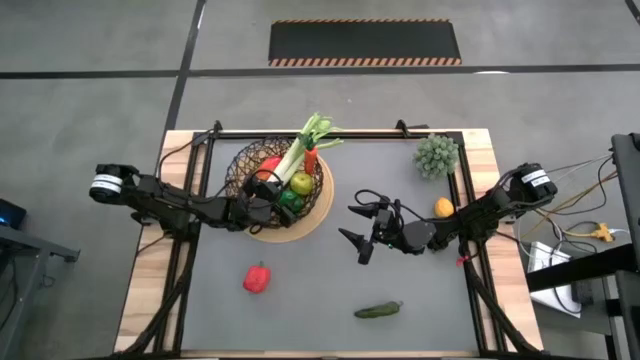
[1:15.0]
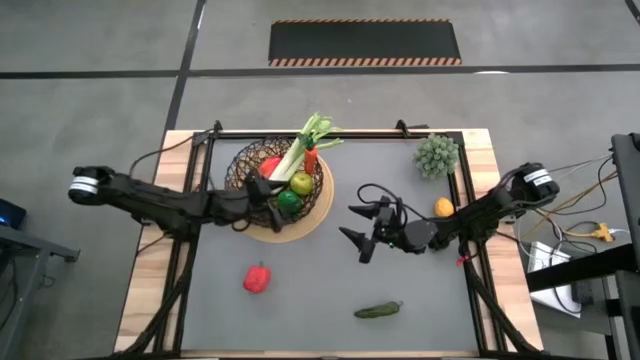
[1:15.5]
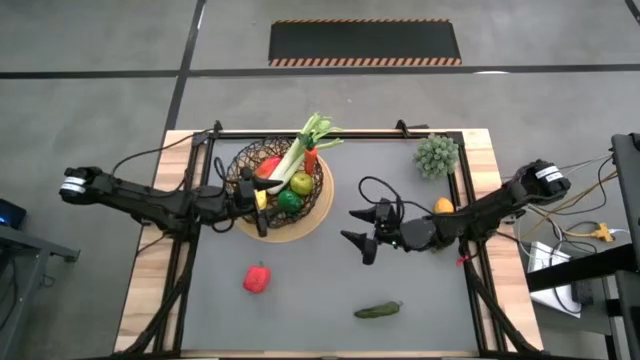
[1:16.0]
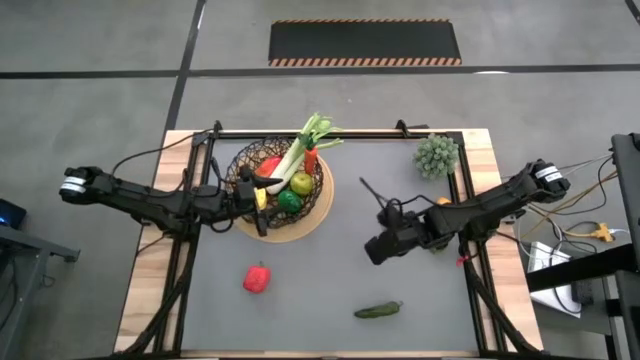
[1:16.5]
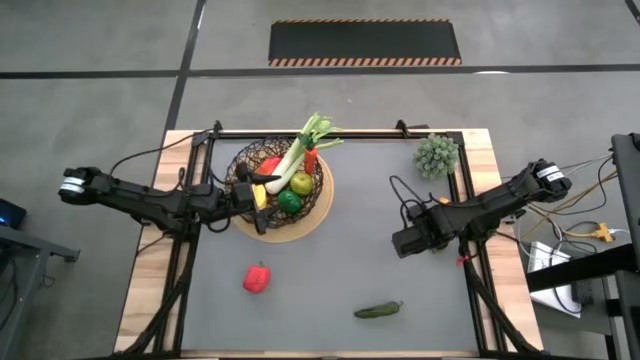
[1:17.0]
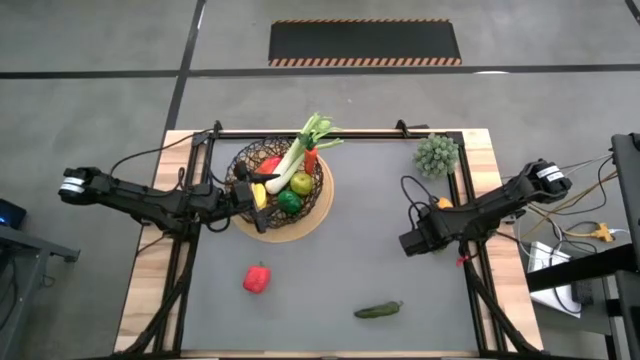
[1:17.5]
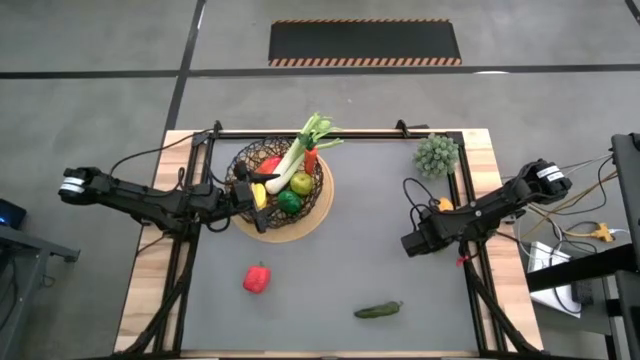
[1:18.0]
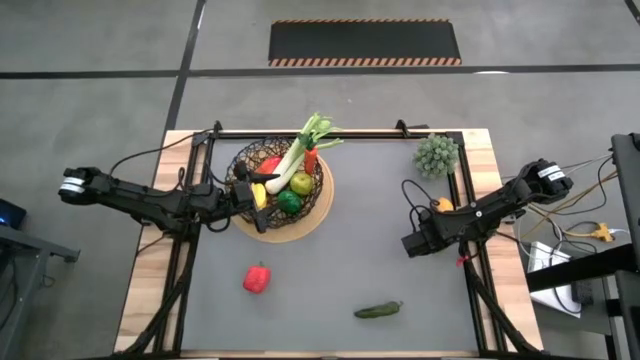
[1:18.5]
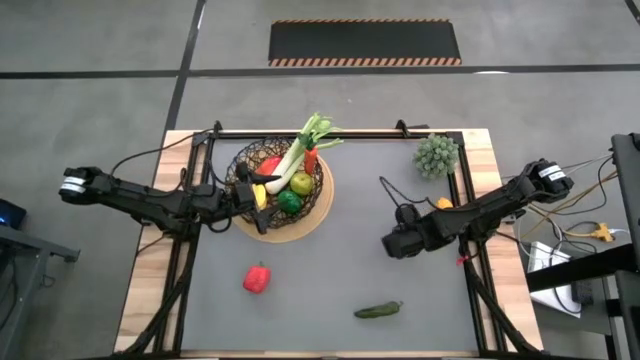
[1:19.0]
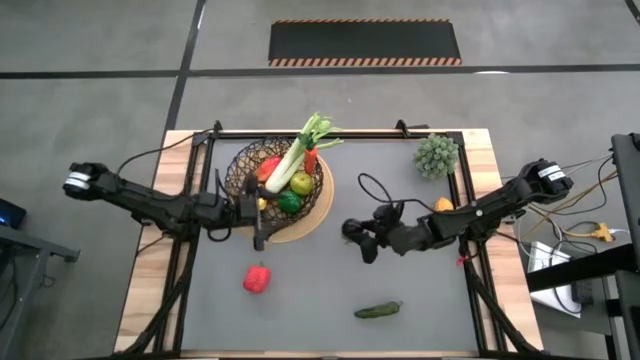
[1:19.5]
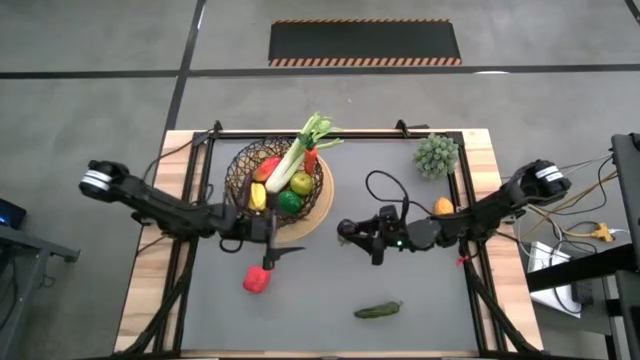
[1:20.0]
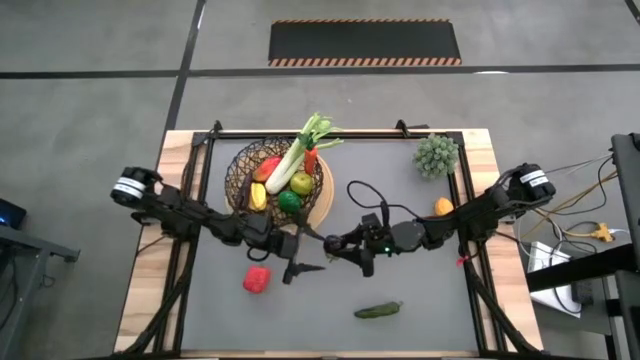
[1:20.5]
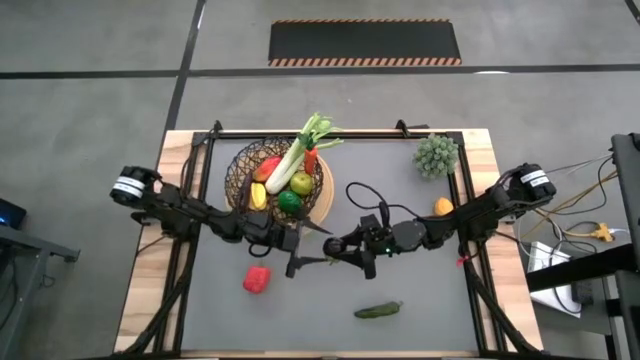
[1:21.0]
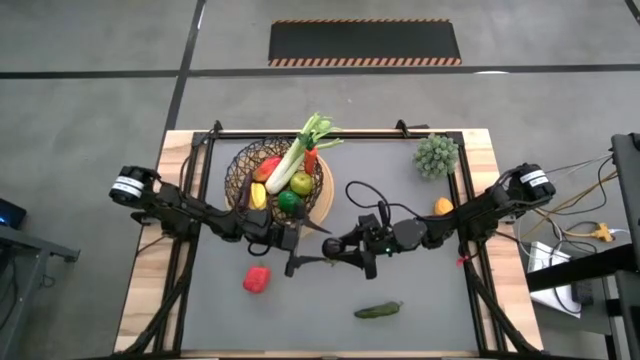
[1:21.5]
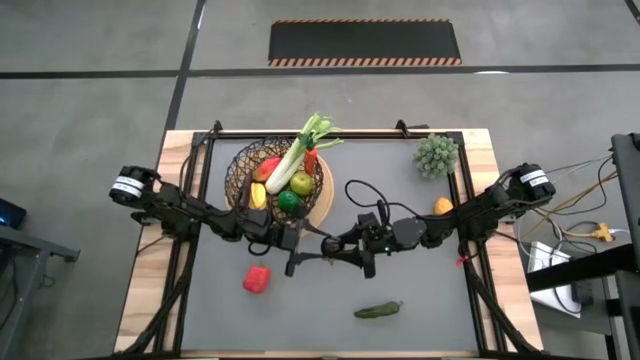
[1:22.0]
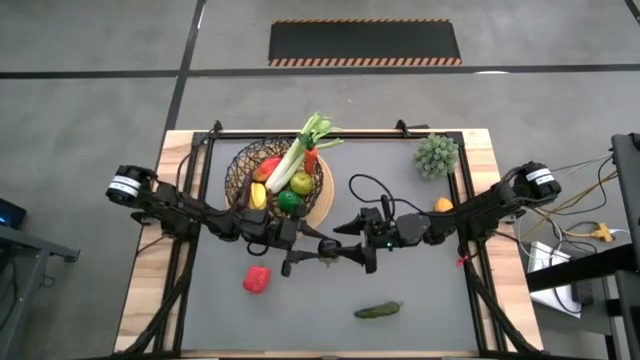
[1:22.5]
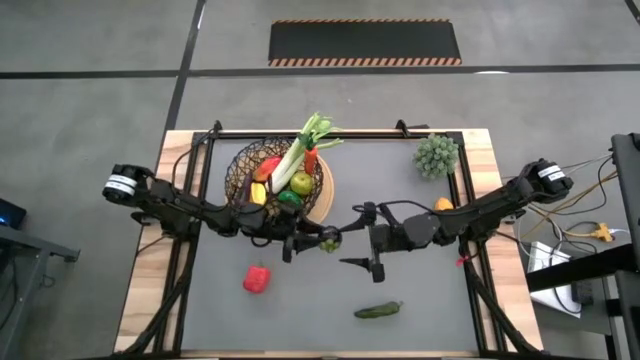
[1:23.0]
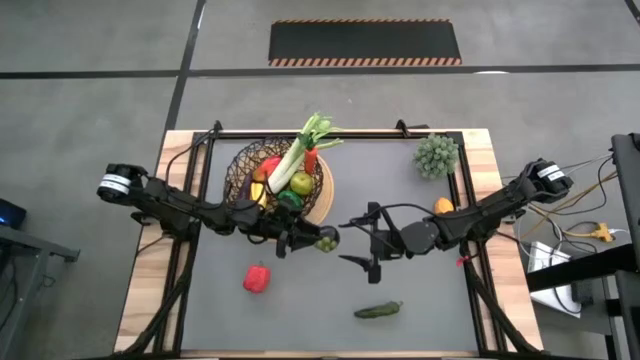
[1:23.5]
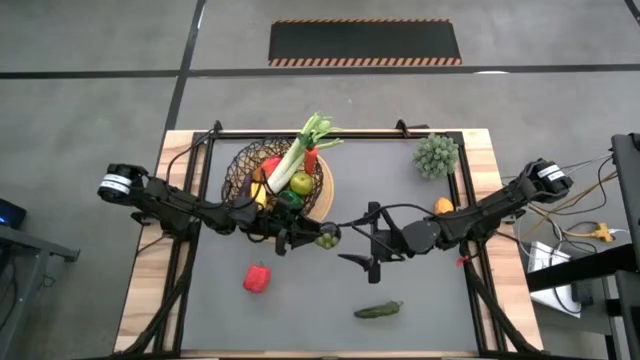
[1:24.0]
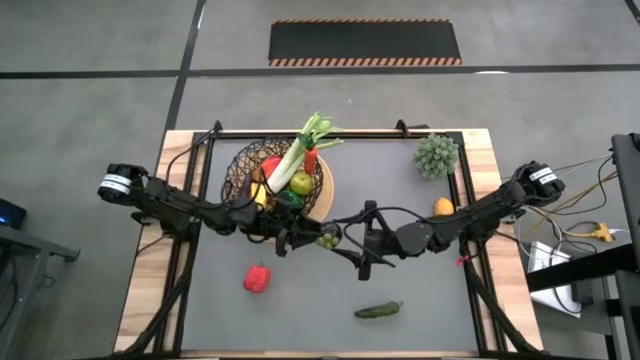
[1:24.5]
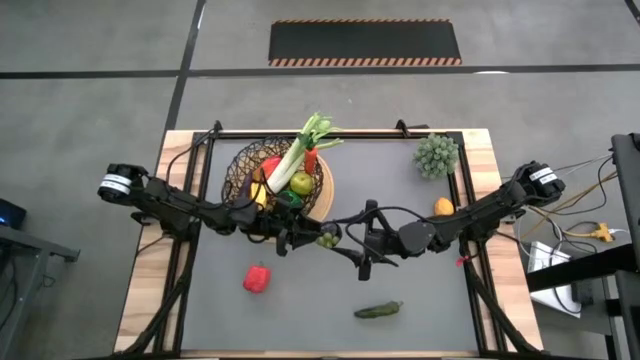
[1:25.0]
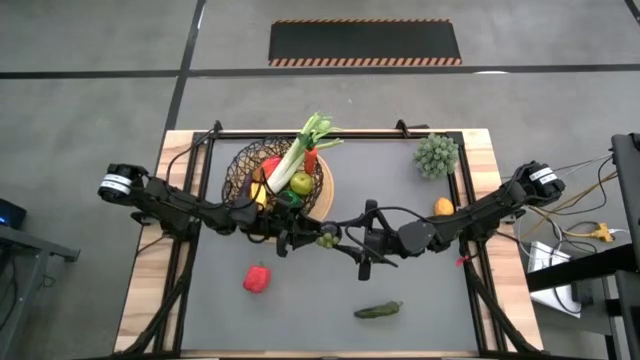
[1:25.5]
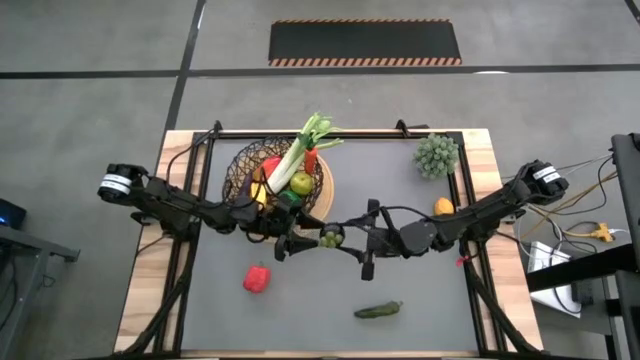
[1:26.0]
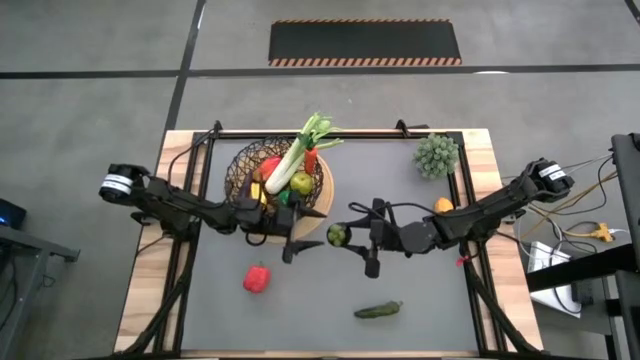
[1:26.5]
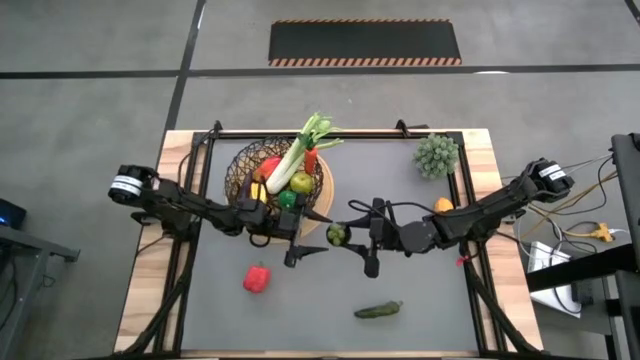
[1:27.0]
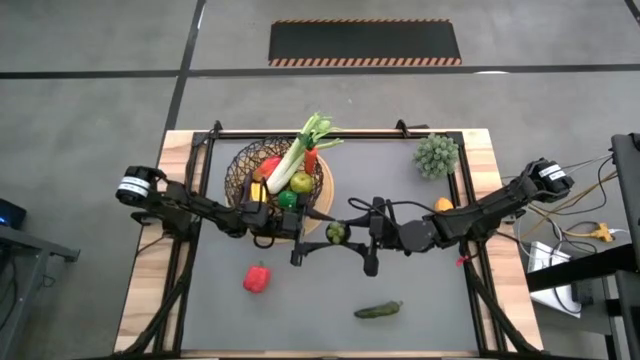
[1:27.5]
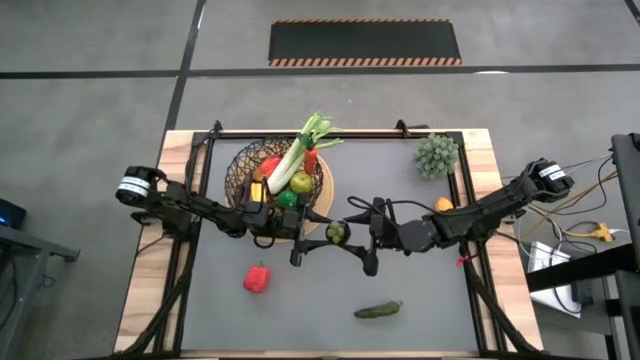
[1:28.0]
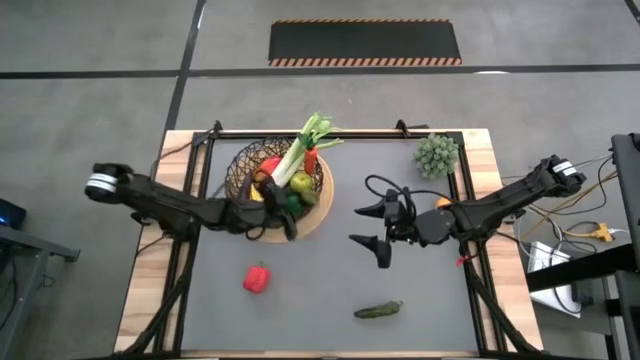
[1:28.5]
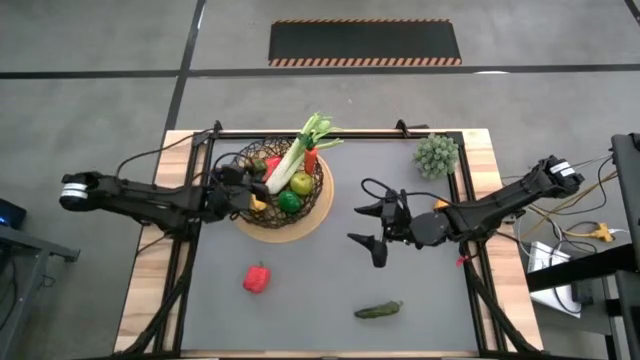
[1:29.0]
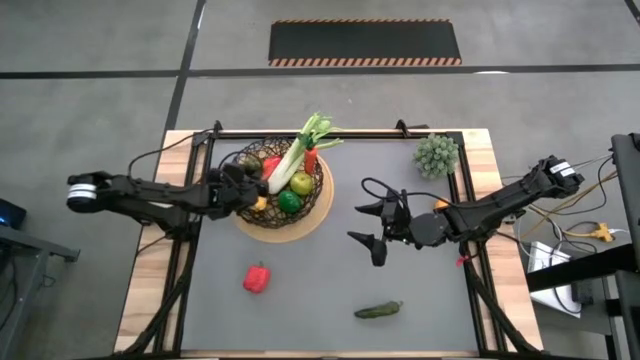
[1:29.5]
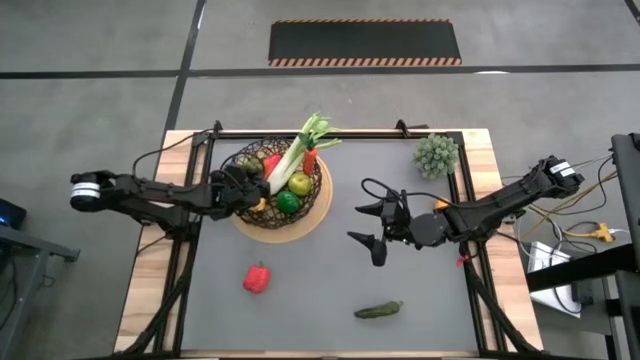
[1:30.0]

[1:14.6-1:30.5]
Task: Build produce basket
Put the purple mangosteen into the black wire basket

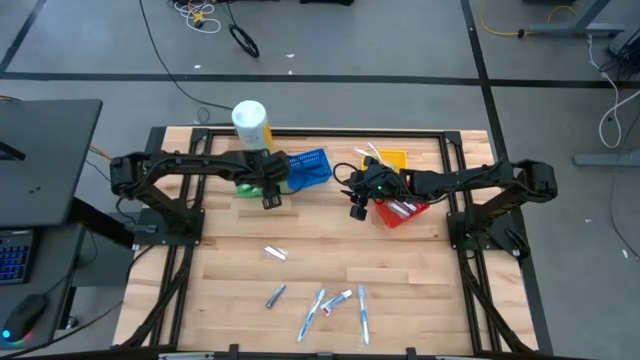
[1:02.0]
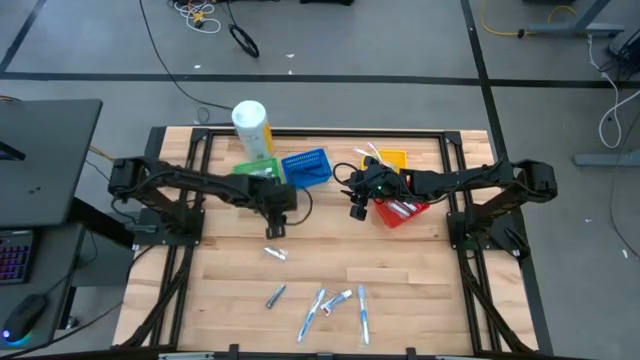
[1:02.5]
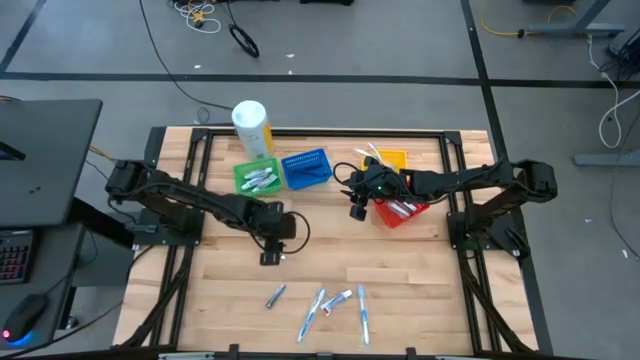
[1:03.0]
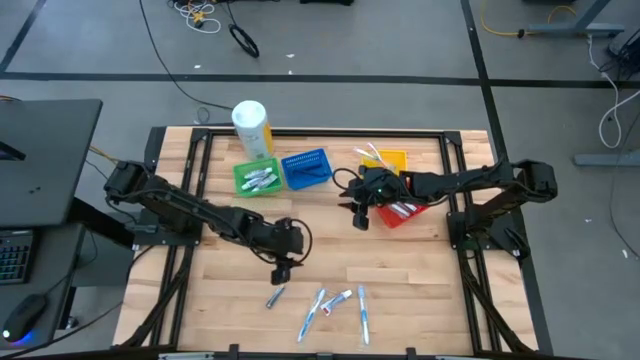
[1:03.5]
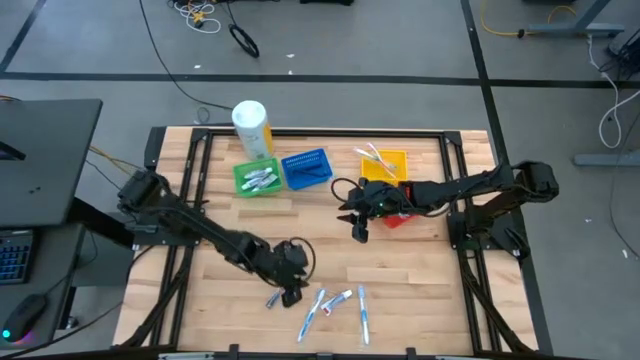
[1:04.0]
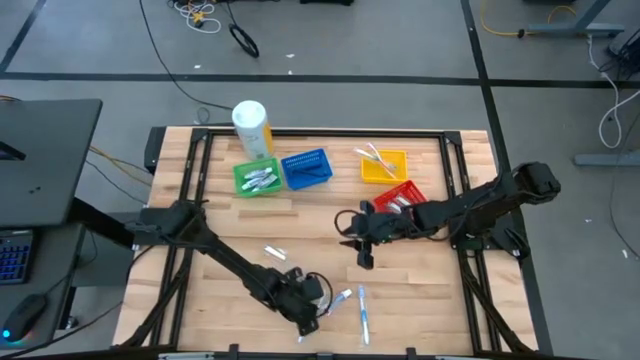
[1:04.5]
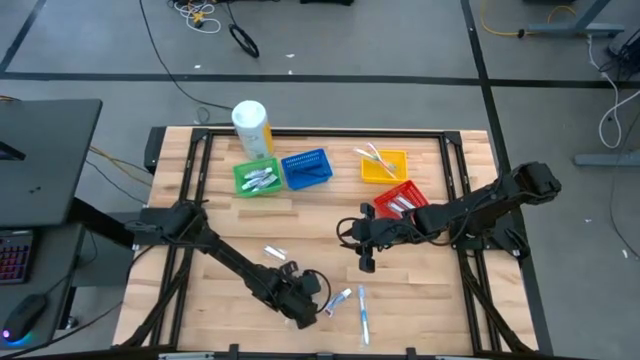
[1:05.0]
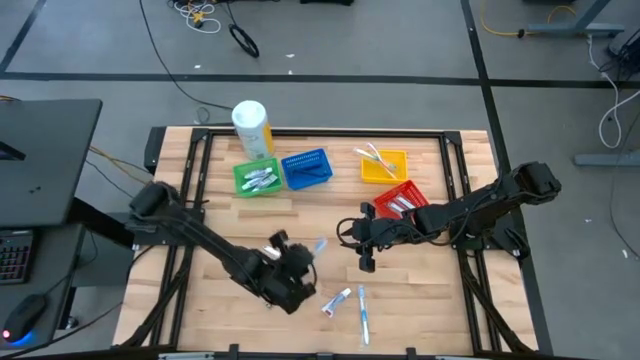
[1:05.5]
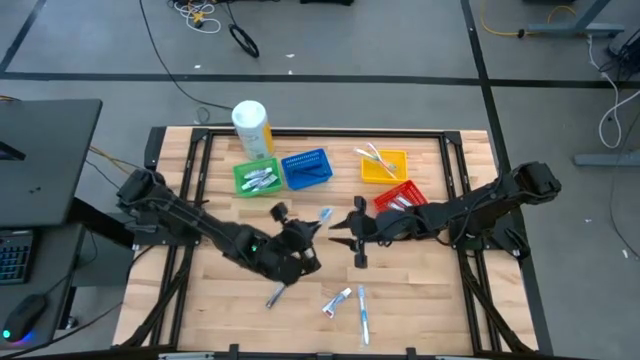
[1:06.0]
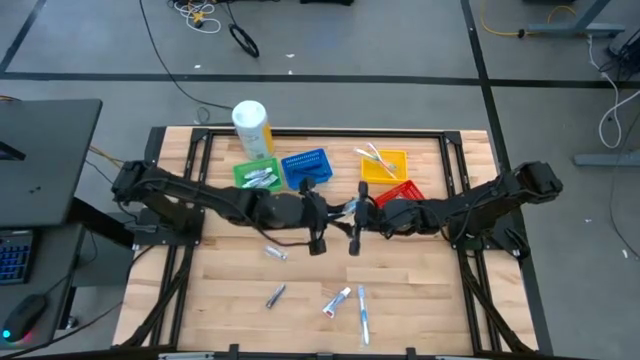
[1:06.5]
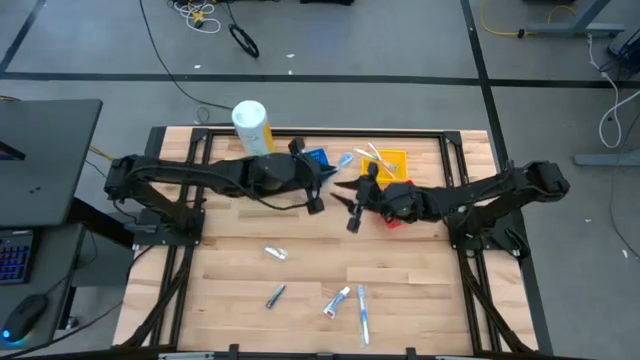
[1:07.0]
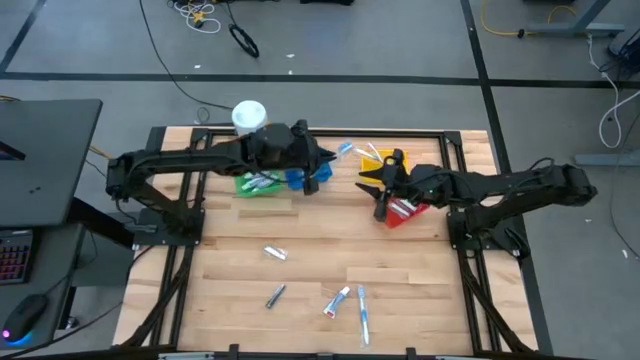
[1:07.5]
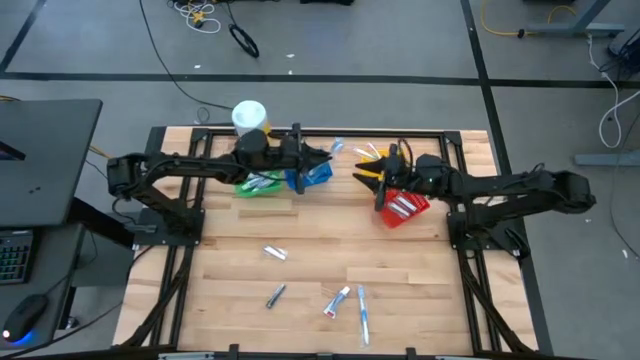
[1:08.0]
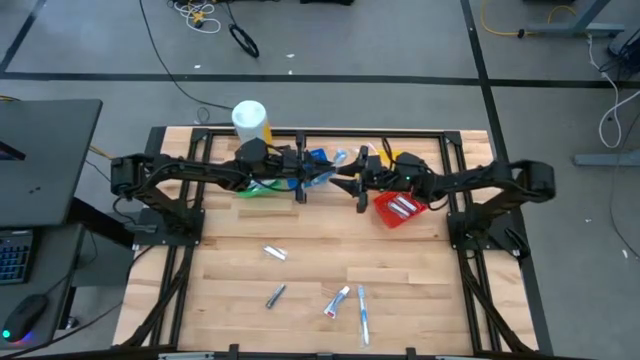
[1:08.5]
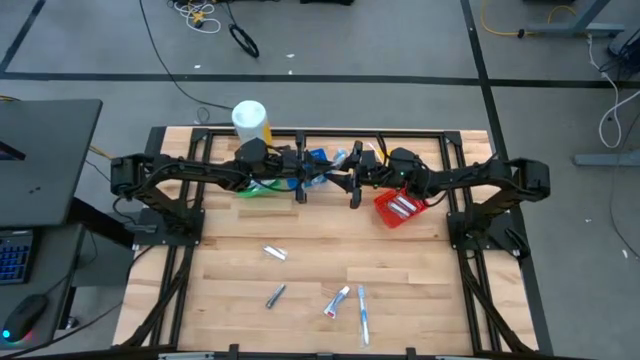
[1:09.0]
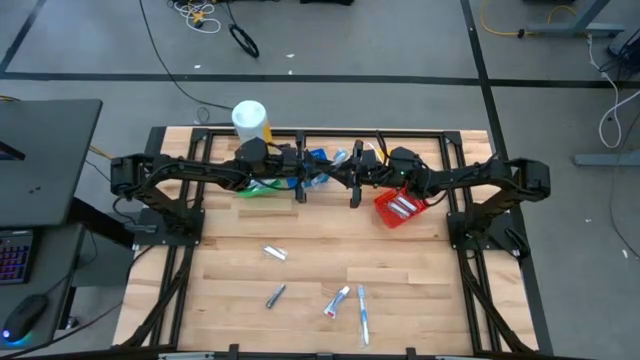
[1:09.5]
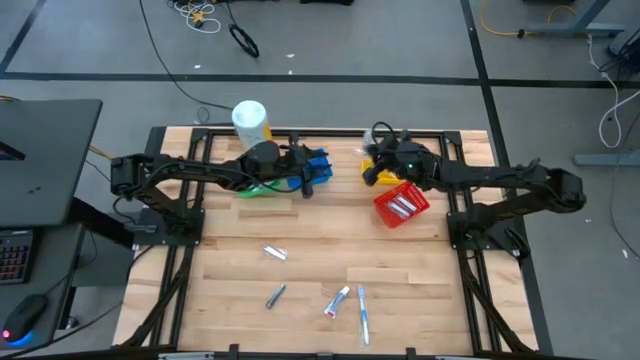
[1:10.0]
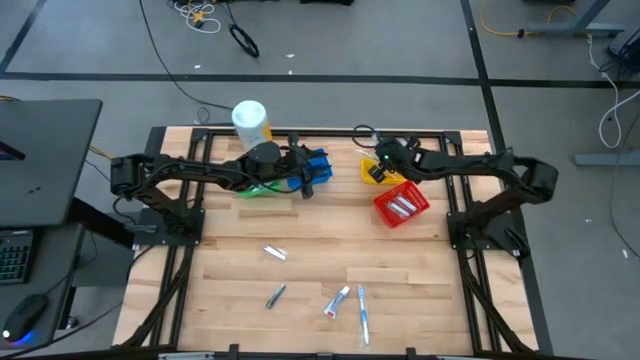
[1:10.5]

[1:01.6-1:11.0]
Task: Pick & Place Travel size toiletries
Put the left blue toothbrush into the yellow bin
